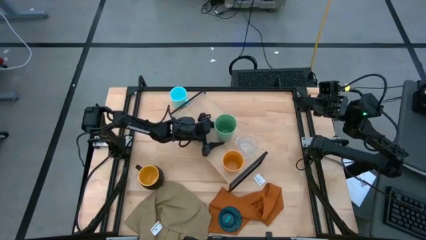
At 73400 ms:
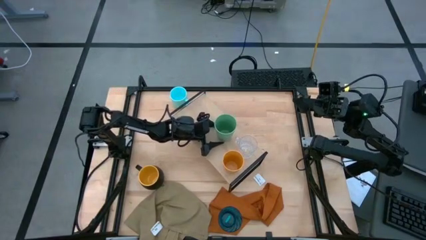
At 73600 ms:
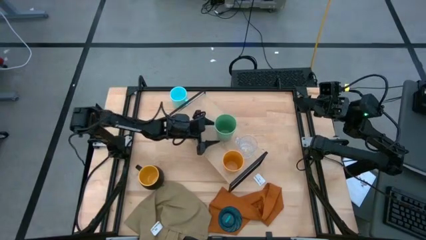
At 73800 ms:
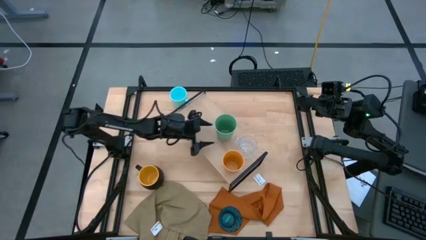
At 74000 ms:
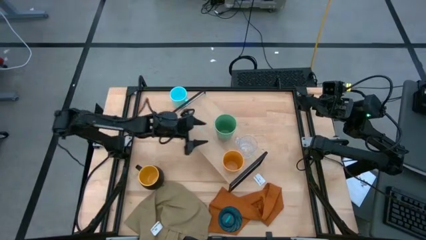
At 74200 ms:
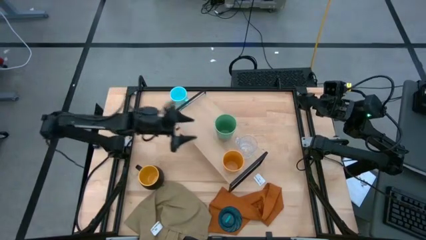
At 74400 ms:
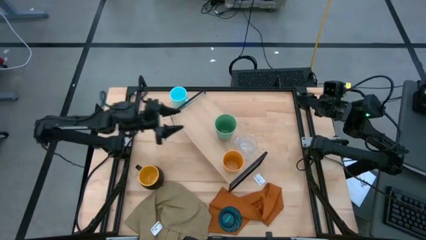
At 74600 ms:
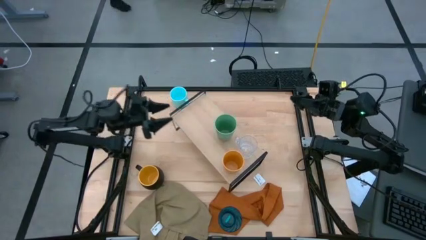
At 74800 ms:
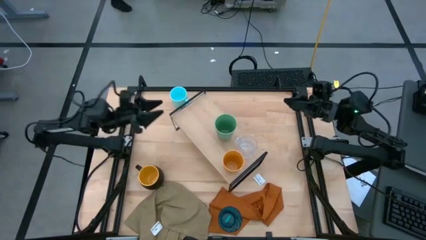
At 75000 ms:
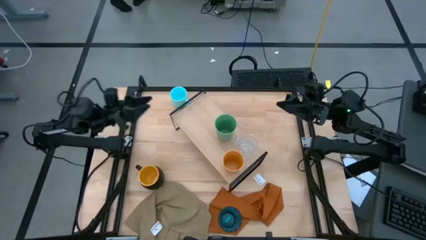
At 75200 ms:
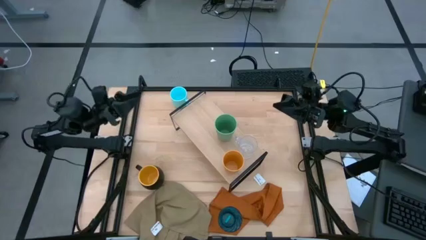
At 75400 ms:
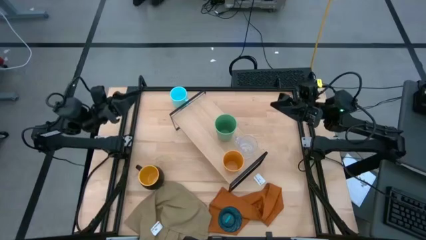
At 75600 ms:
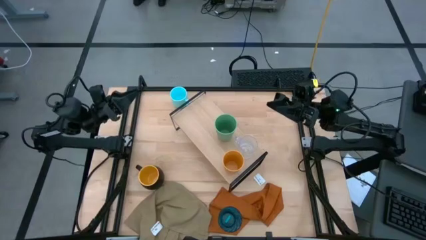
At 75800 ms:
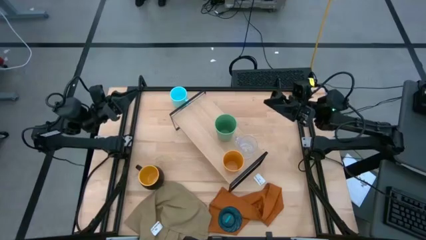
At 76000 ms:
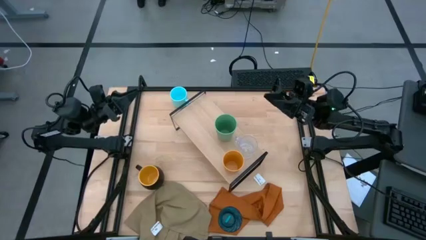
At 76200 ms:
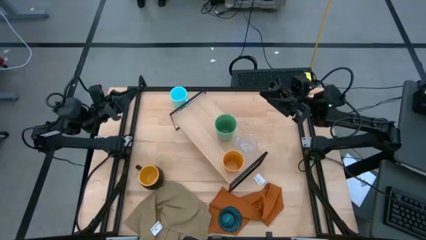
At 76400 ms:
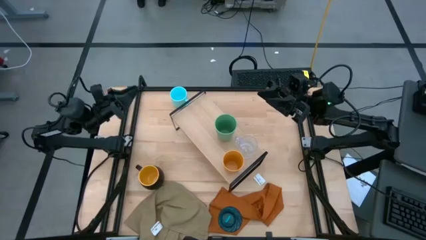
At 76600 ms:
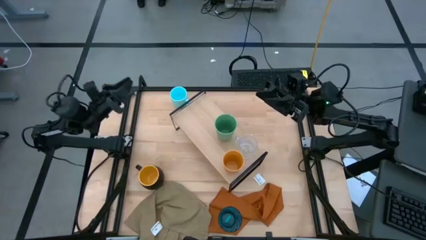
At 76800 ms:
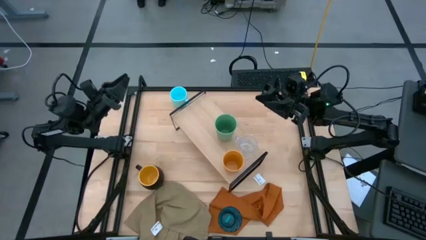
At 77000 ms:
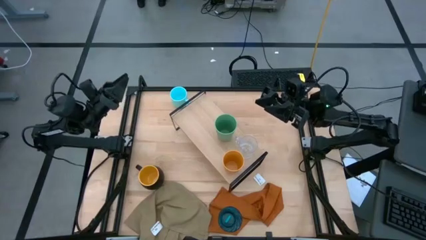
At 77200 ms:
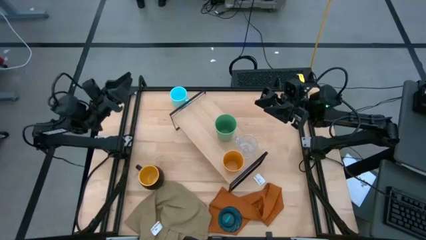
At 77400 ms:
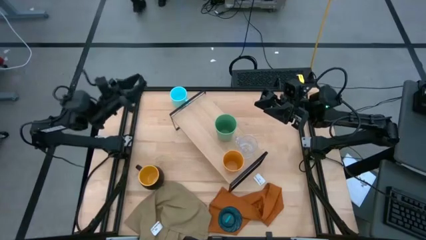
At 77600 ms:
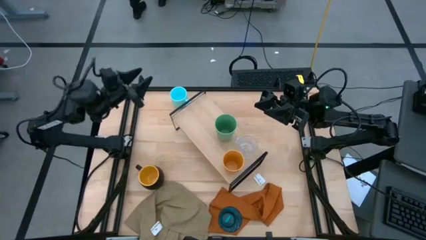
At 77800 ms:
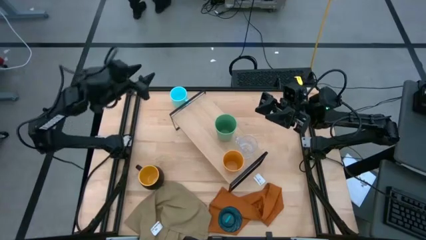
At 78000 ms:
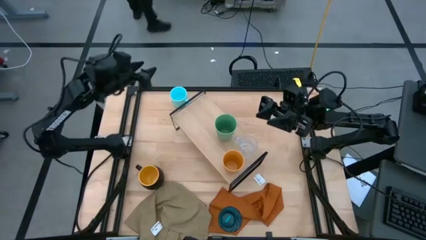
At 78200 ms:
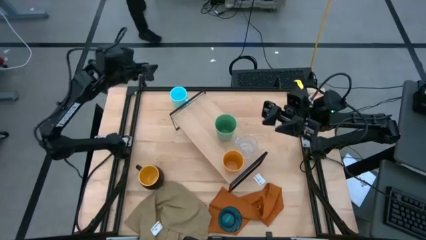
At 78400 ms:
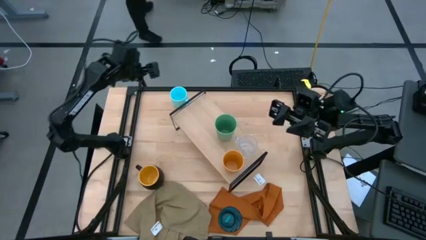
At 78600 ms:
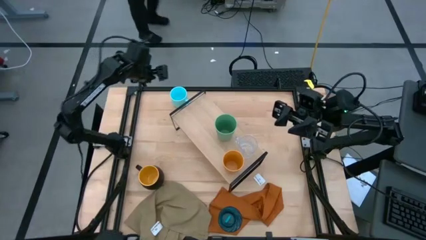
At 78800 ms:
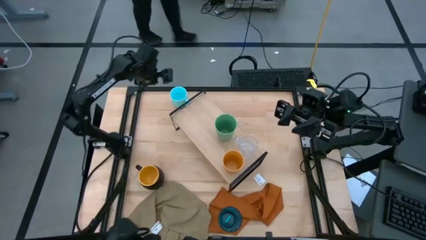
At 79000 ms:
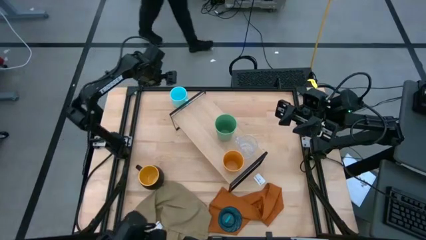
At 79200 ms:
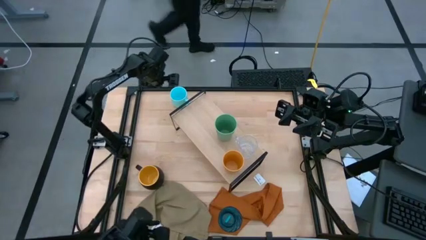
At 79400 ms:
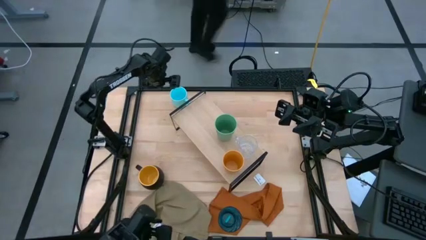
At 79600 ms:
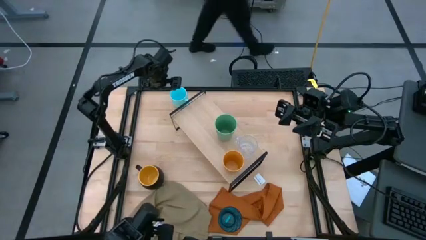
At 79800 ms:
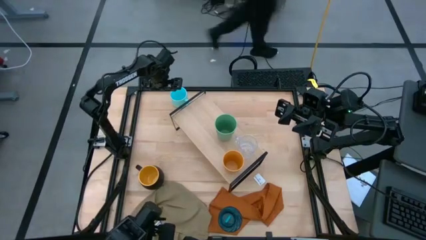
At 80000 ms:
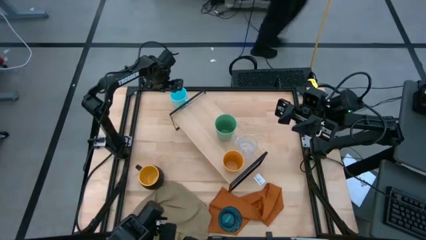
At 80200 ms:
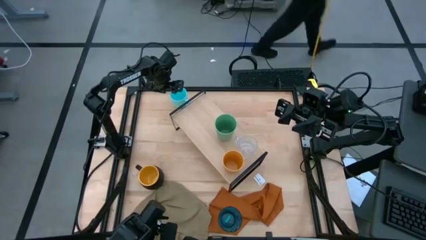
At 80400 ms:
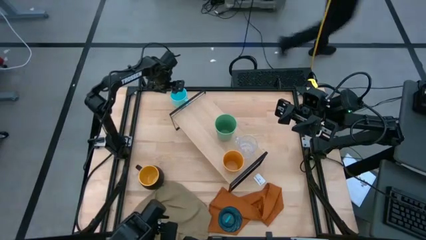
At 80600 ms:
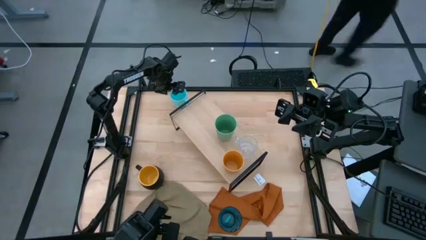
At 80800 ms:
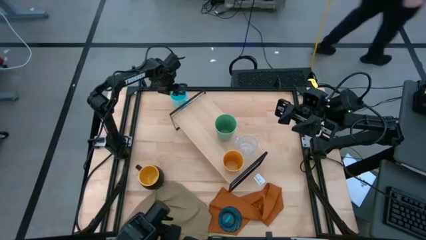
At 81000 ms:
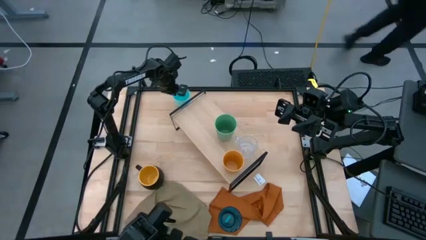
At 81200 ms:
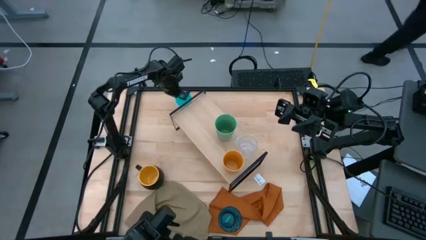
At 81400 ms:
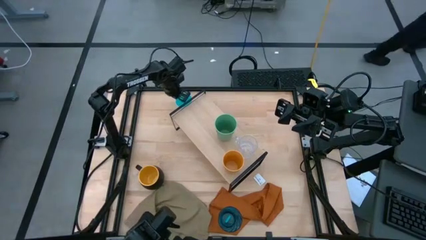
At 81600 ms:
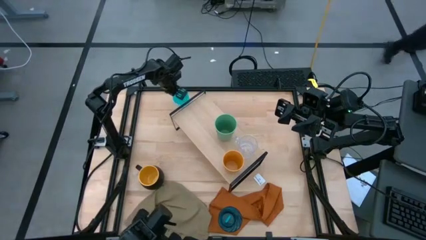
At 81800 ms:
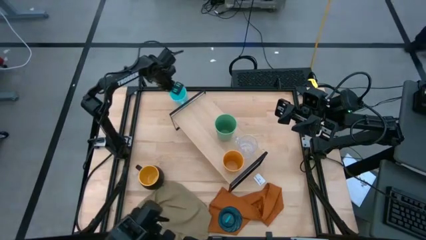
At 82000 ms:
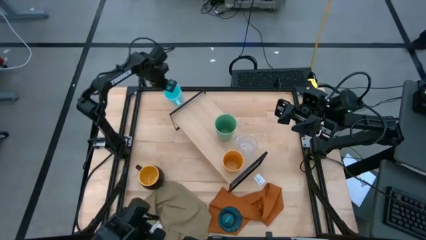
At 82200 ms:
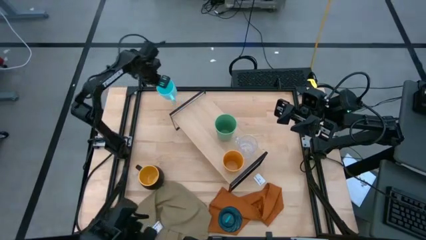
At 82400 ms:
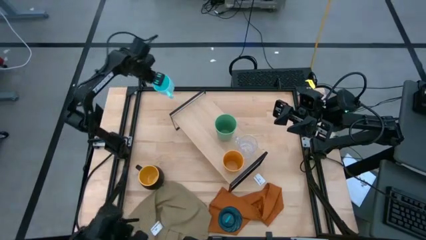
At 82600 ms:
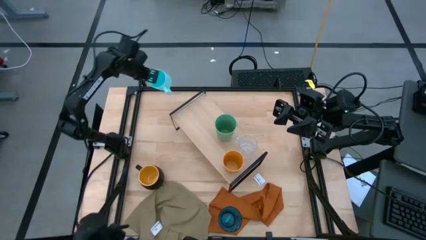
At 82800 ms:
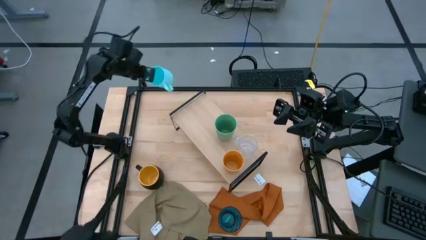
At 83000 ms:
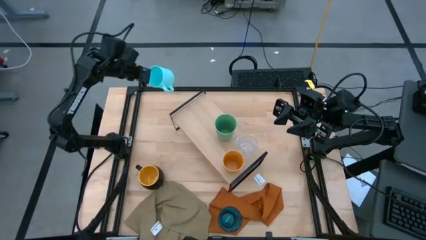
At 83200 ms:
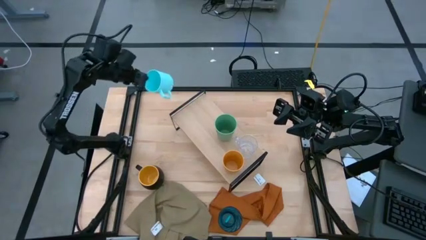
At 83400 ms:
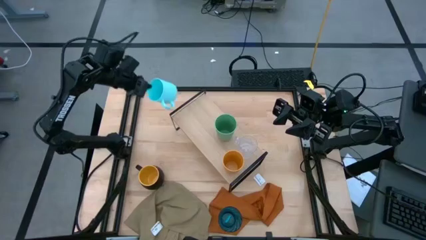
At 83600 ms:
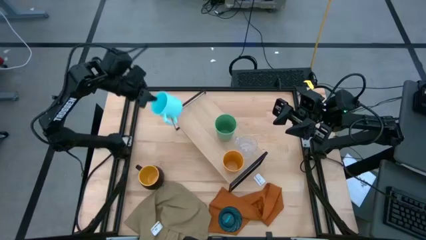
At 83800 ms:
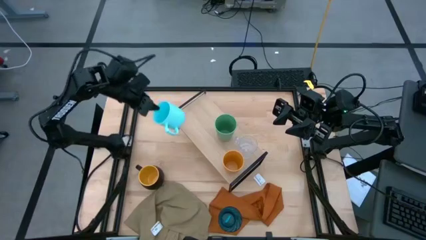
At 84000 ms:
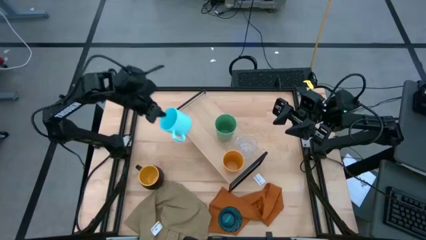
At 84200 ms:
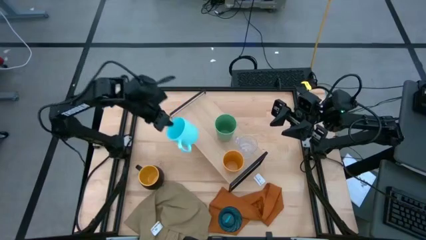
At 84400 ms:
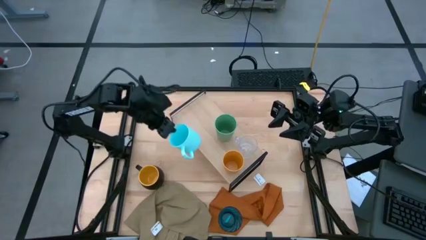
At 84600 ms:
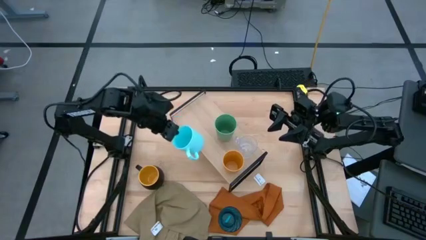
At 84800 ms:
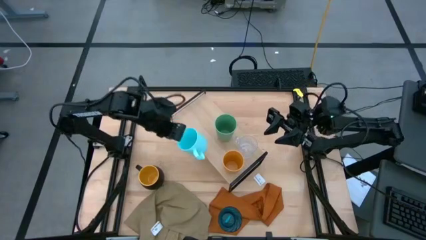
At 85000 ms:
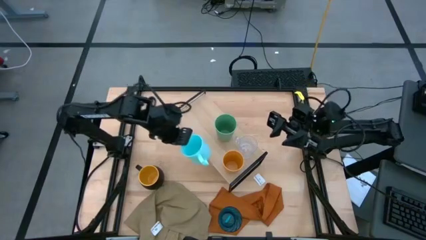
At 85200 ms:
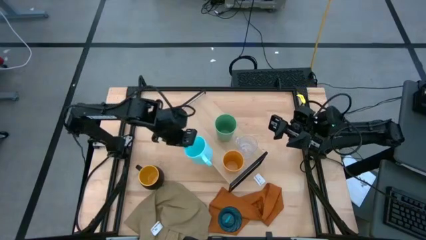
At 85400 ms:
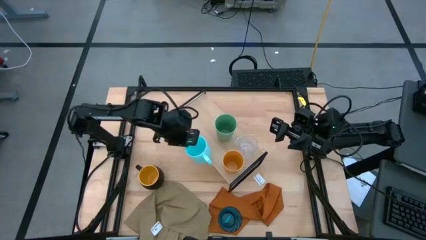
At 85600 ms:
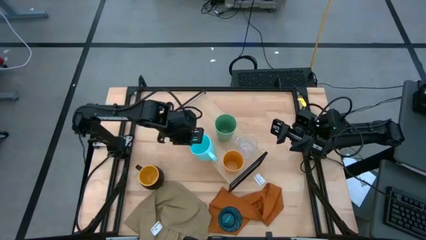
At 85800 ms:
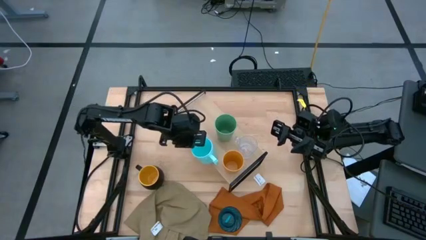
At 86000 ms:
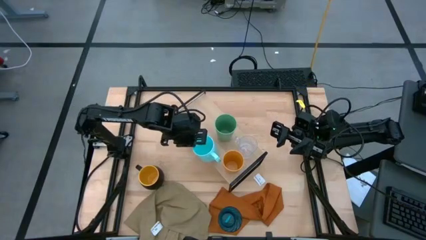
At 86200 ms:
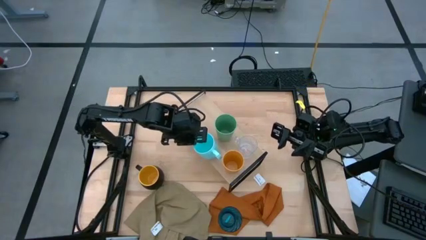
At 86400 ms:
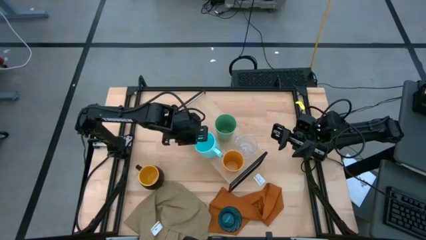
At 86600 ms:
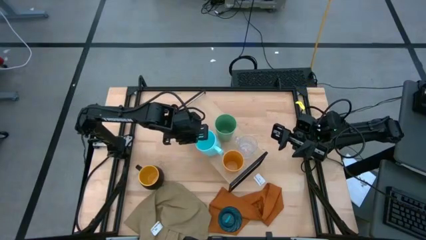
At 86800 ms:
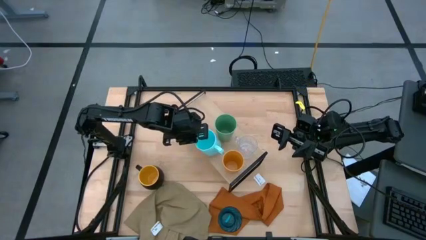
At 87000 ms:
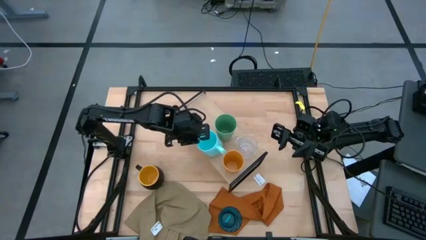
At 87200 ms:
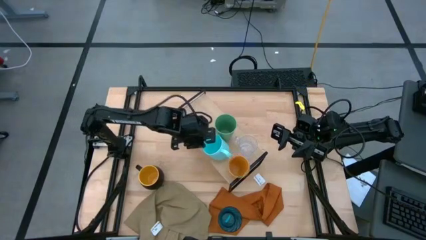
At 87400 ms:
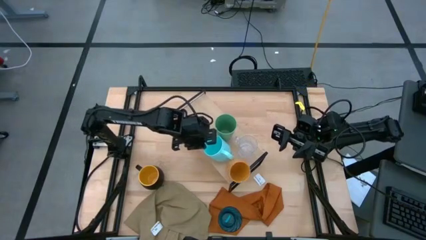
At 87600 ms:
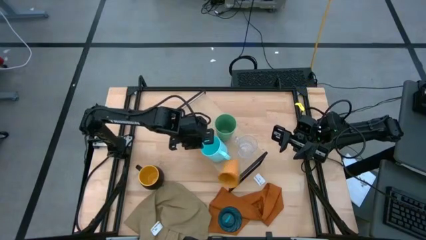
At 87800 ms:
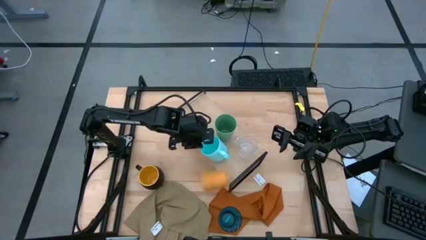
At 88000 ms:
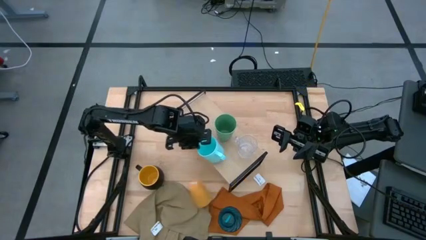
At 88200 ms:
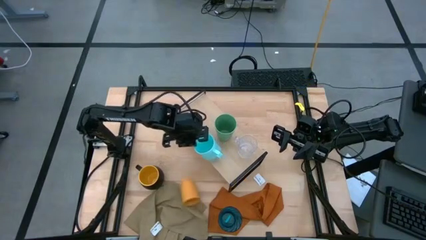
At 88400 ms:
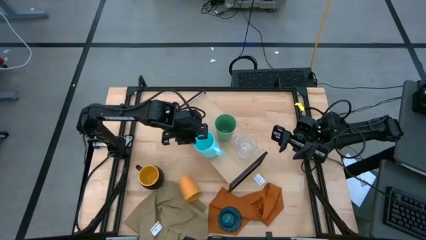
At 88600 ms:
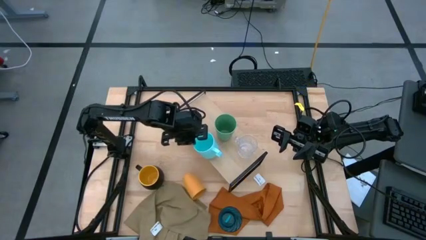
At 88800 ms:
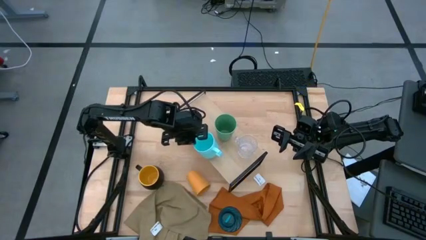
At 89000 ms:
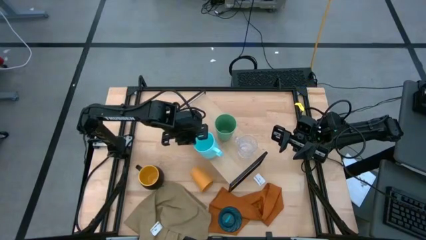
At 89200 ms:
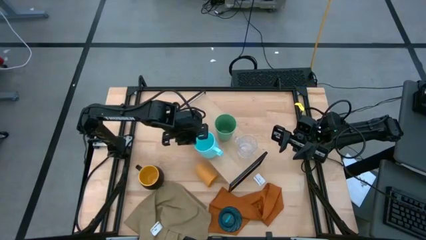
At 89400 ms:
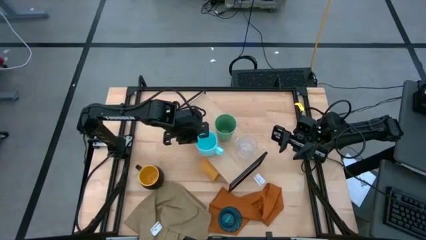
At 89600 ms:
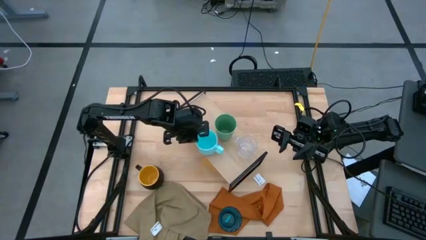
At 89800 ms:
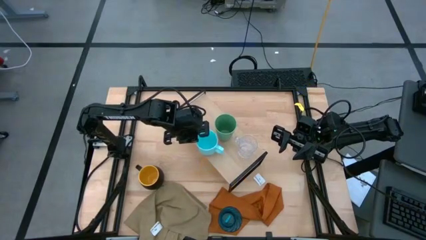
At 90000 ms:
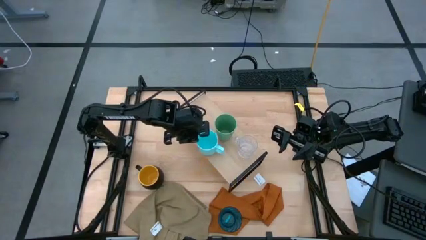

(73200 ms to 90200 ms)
Task: Stack small to large cups/mugs on shelf
Put the blue cup on the shelf
